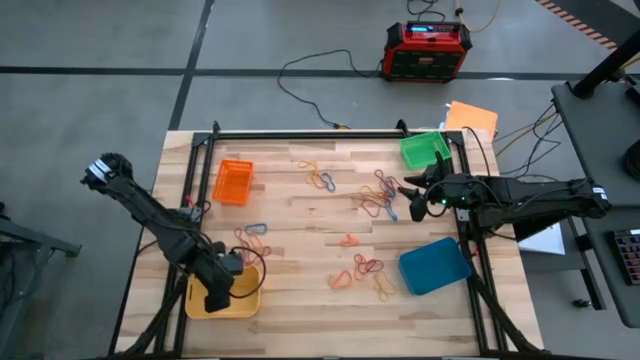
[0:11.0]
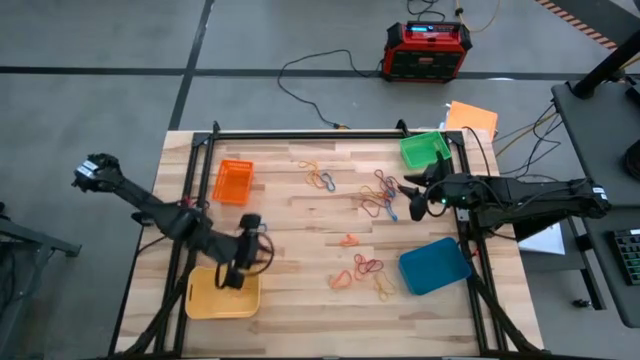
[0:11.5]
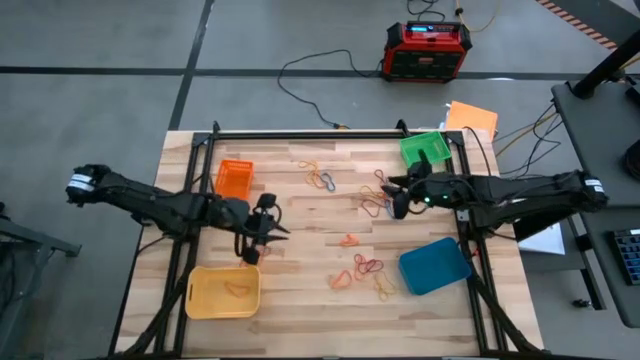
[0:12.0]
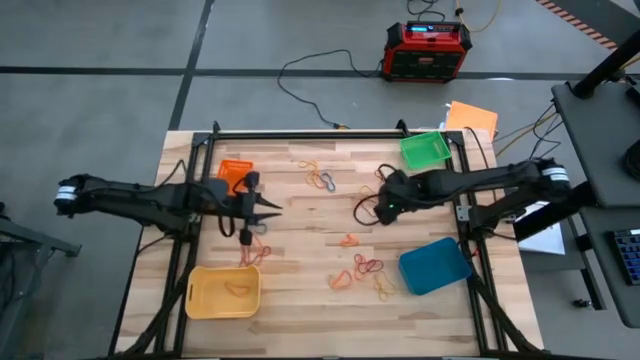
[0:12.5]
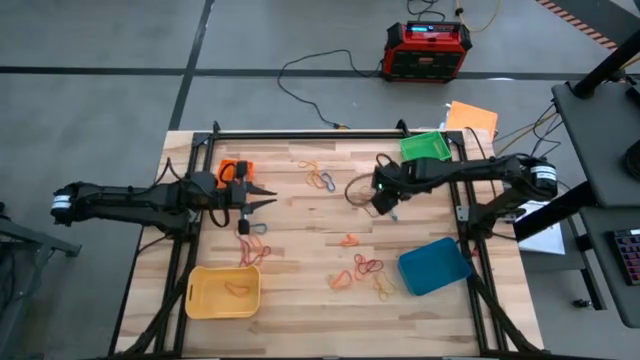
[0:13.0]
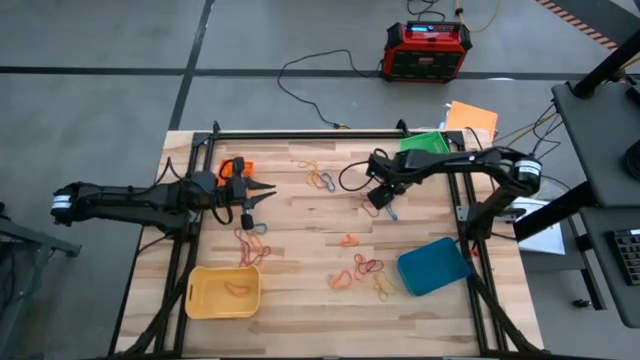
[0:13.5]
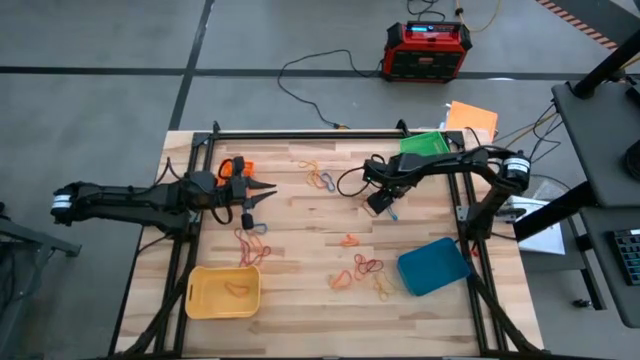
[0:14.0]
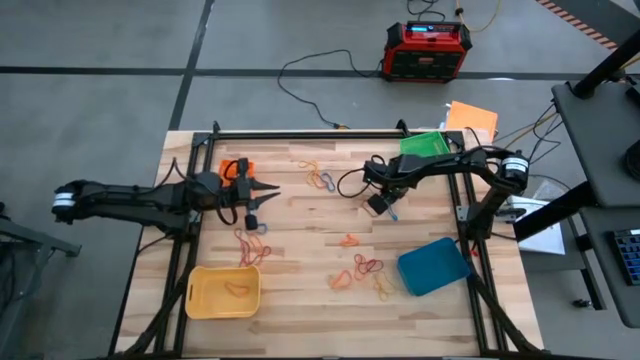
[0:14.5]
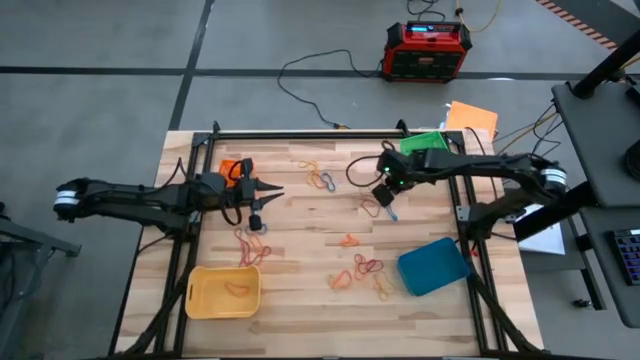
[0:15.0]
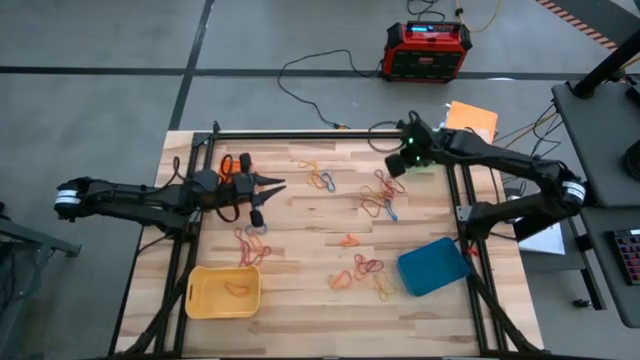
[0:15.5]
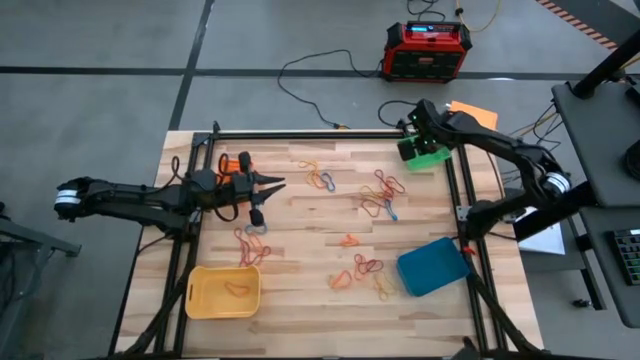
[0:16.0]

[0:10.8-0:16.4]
Task: Sort rubber bands into baskets
Put the blue rubber band into the green bin

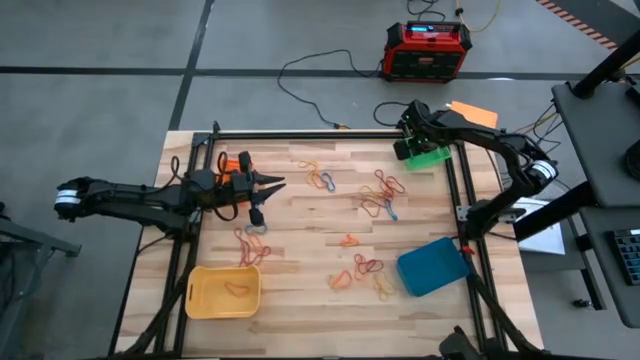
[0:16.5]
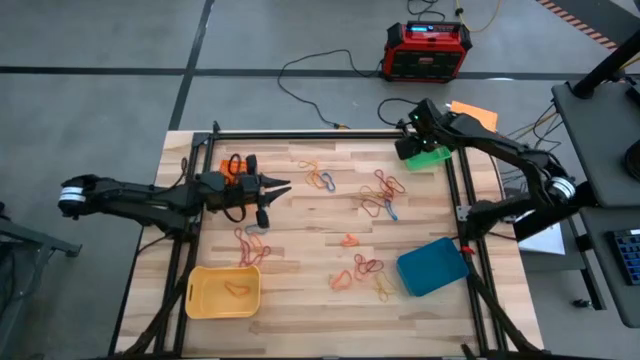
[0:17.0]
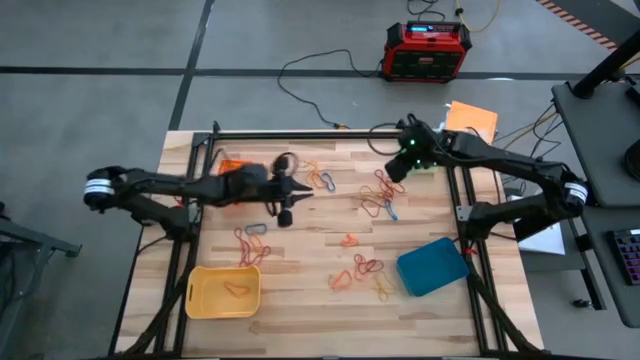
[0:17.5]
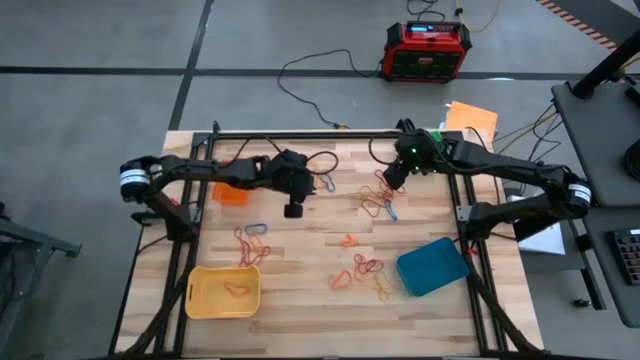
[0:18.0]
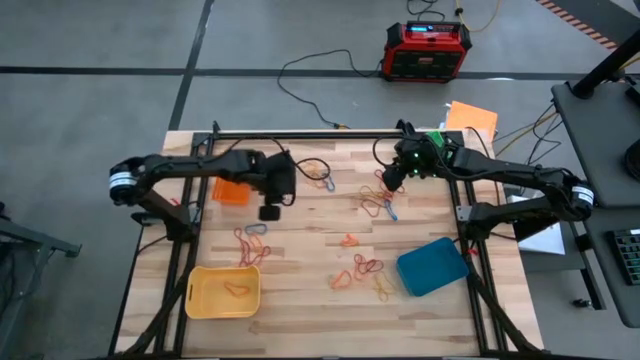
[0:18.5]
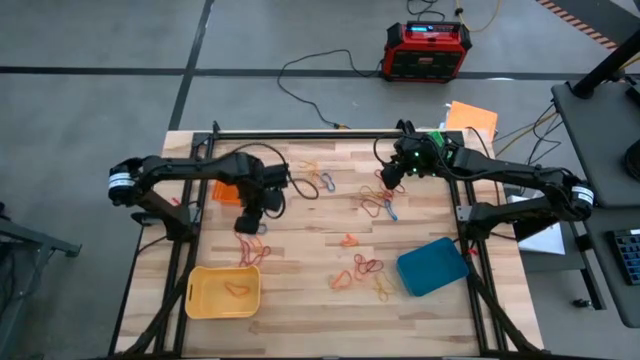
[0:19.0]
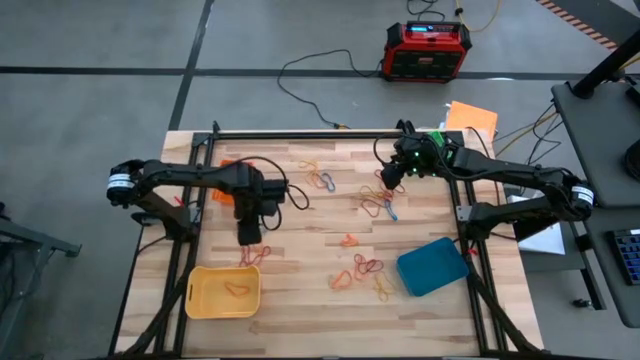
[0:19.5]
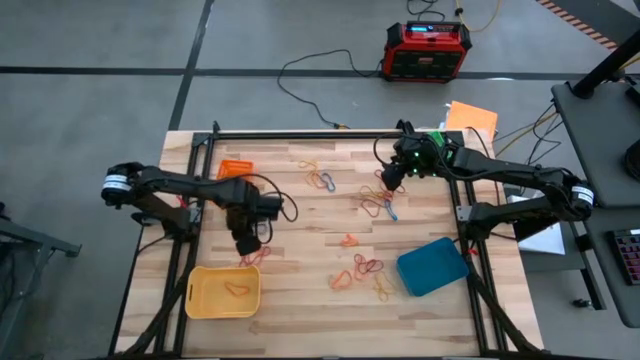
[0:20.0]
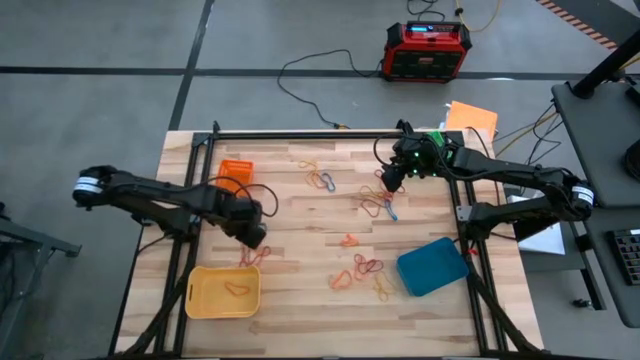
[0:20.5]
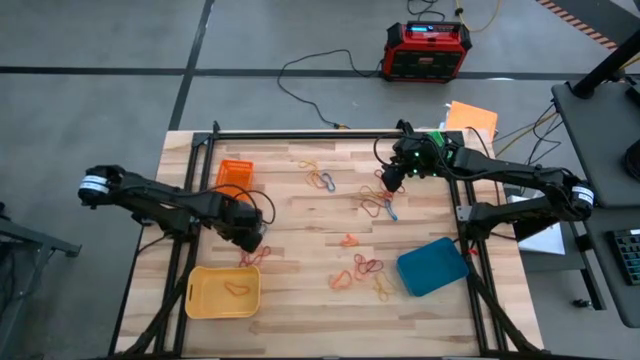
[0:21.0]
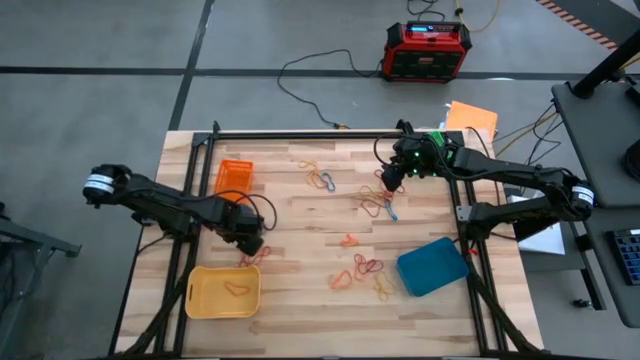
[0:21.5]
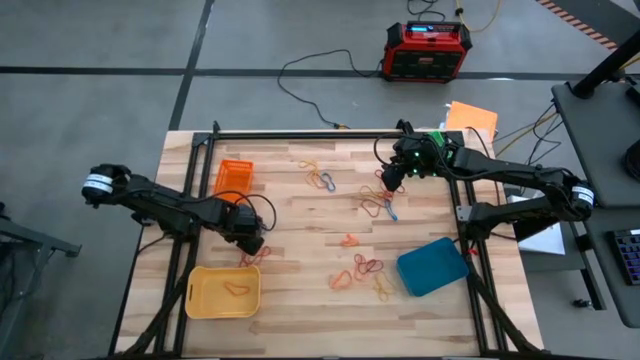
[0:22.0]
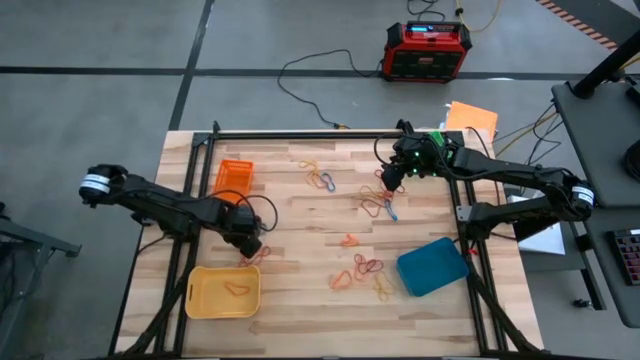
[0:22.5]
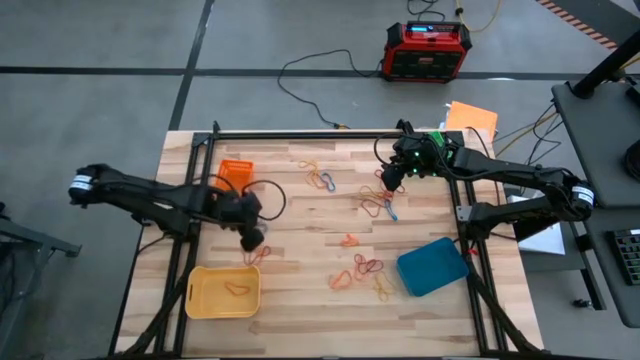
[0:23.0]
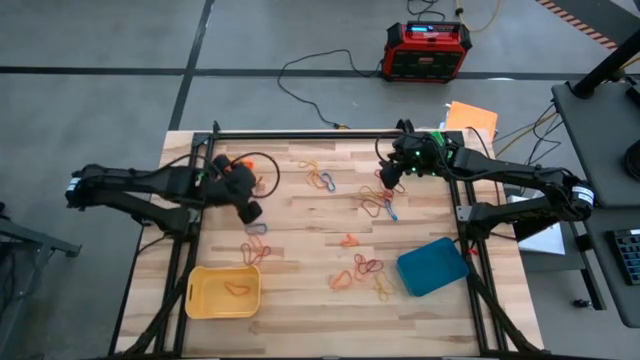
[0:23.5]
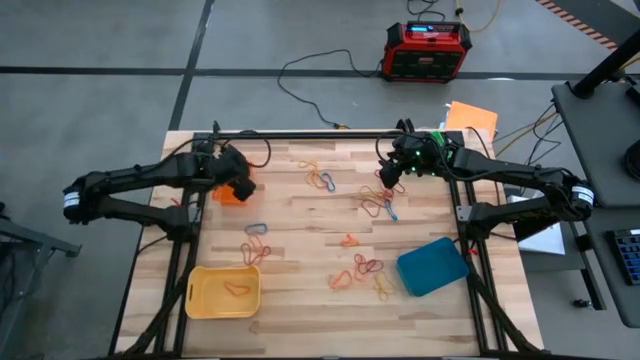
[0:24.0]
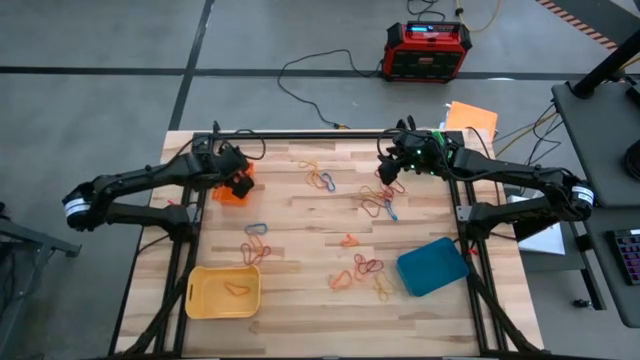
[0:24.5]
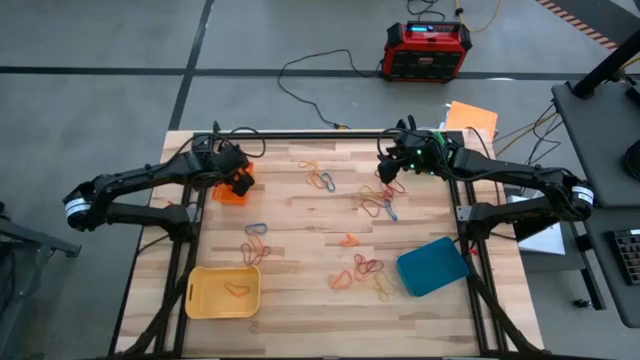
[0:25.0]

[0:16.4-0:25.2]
Put the red rubber band into the orange bin

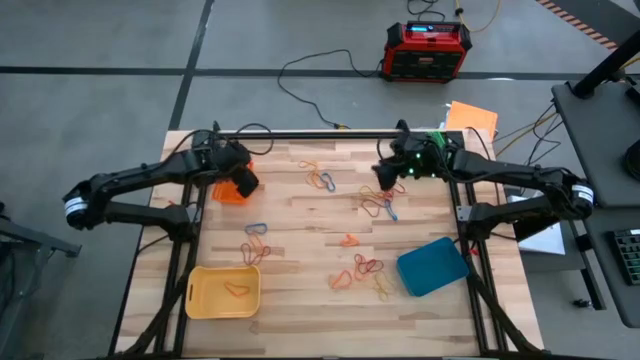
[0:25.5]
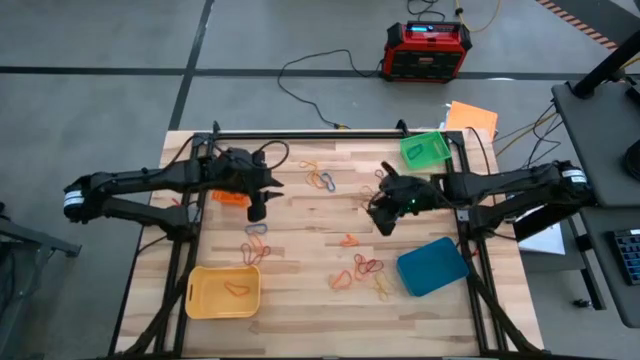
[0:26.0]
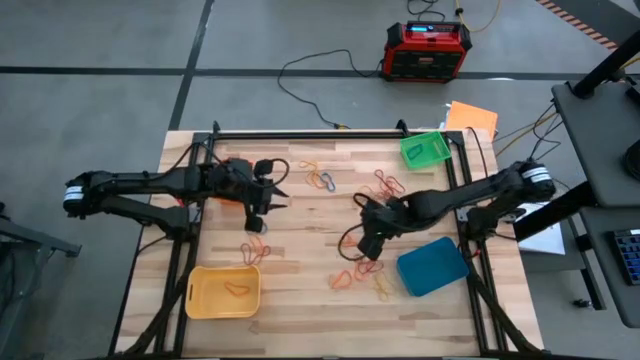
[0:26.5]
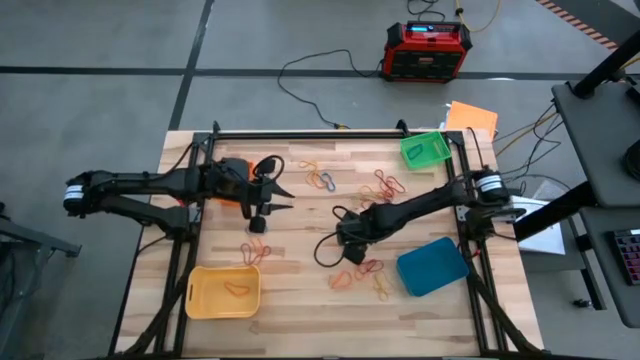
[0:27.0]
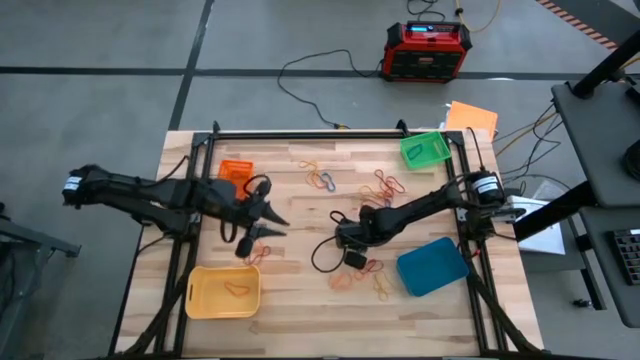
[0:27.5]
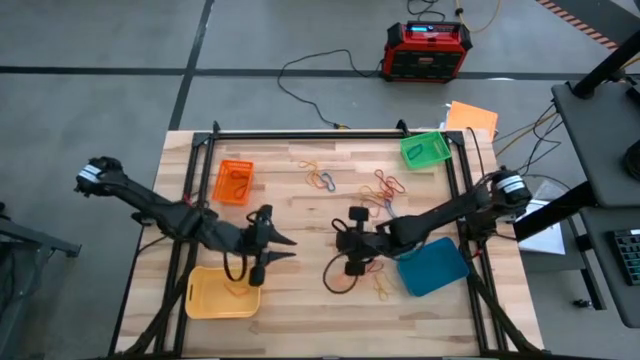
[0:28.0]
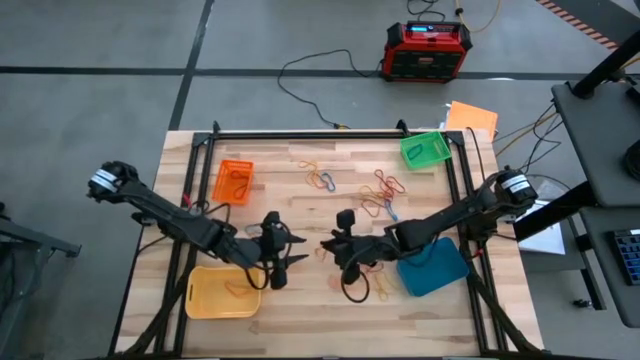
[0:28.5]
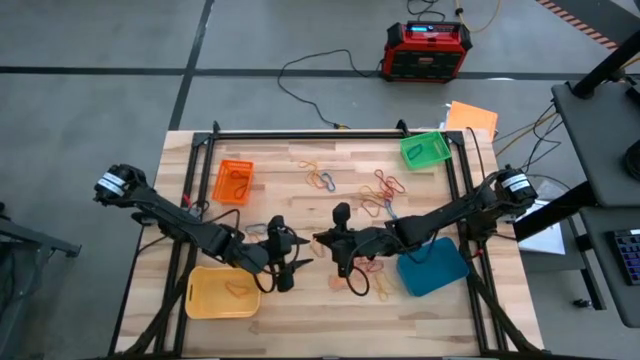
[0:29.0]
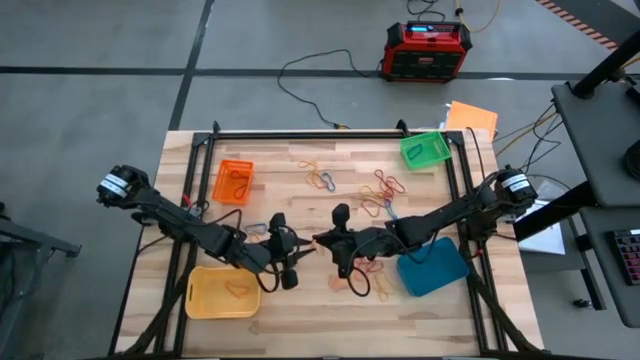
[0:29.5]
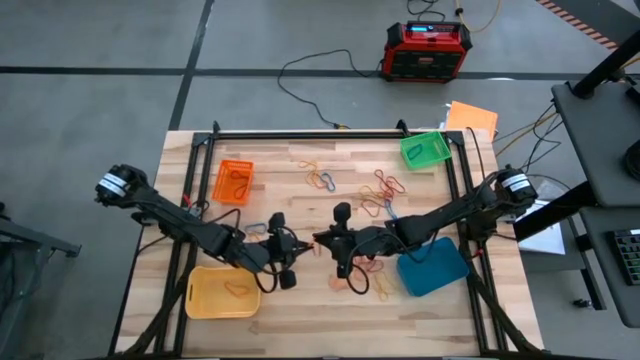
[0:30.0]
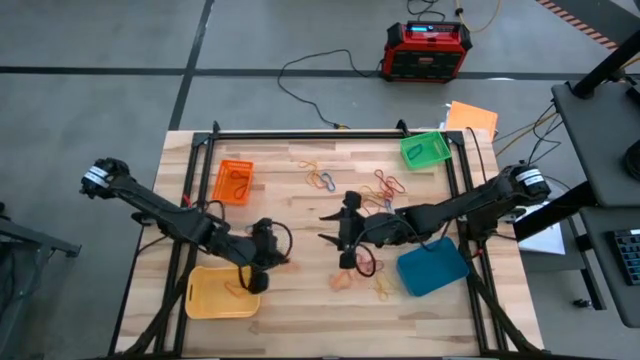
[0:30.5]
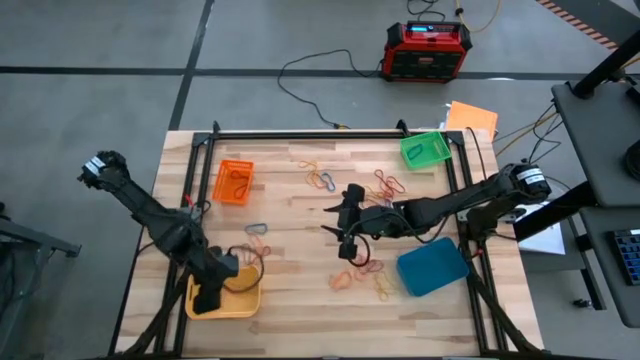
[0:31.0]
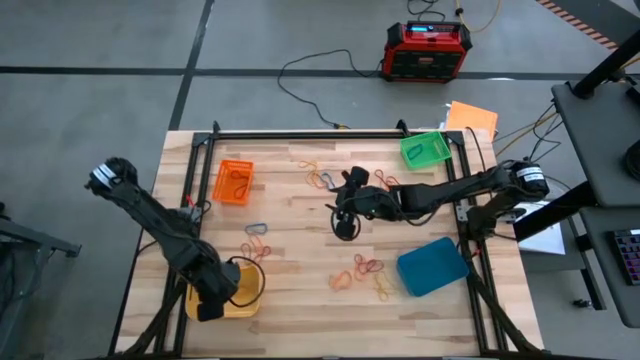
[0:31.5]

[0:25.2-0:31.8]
Put the orange rubber band into the yellow bin
